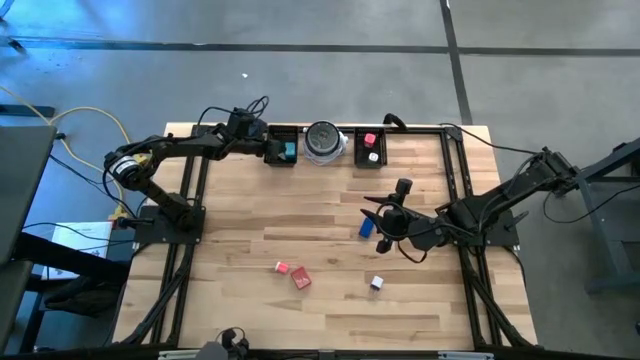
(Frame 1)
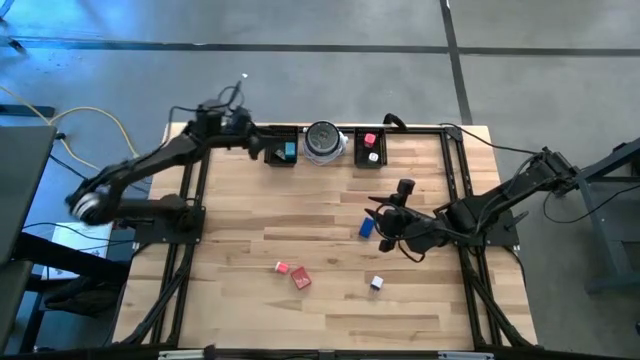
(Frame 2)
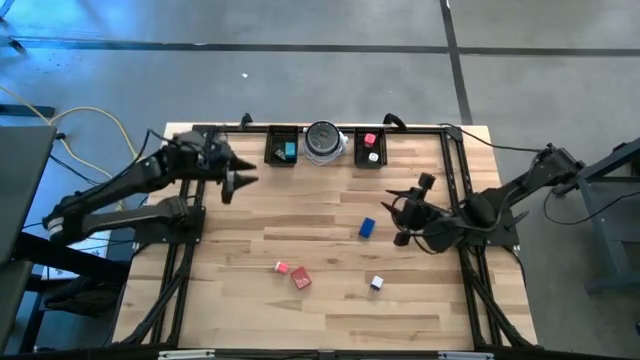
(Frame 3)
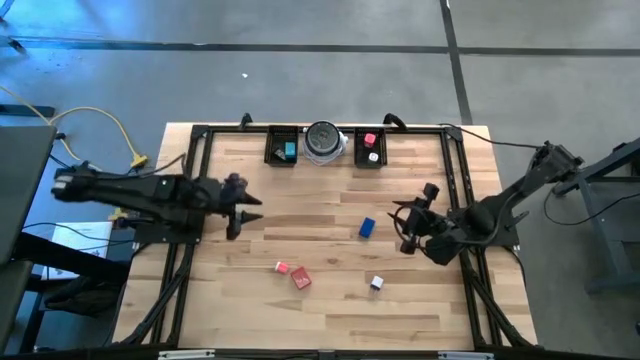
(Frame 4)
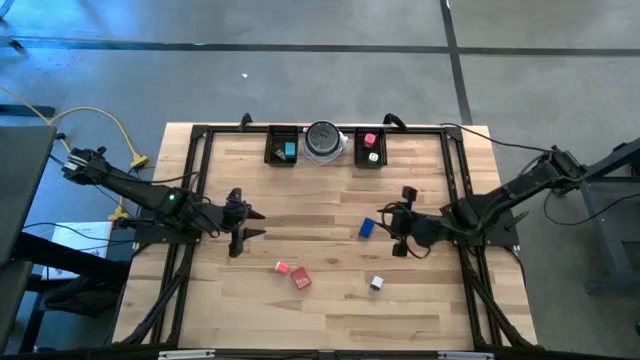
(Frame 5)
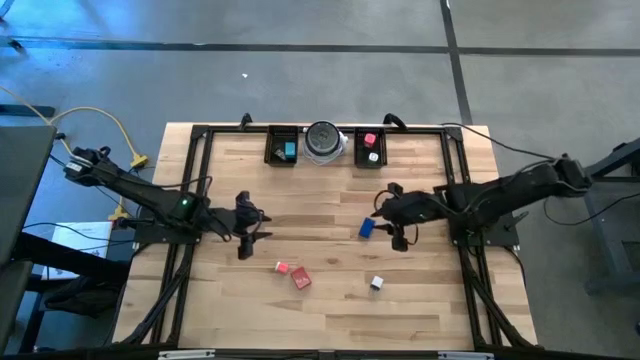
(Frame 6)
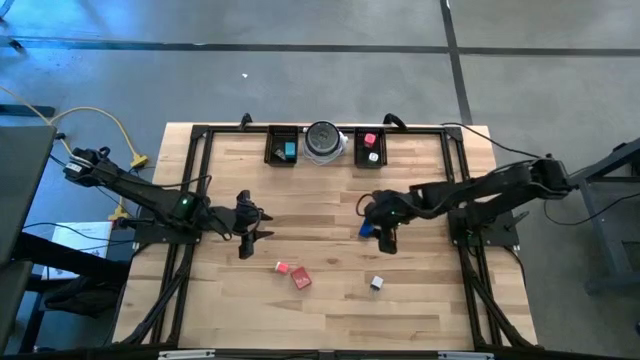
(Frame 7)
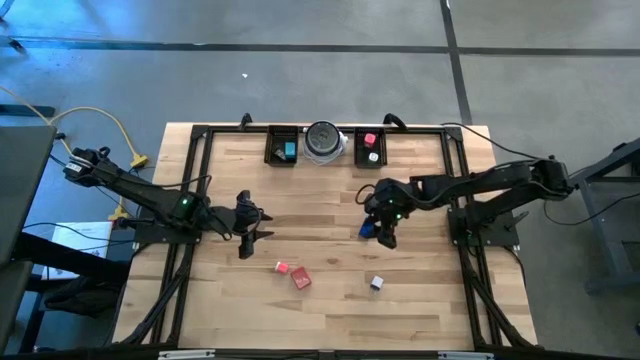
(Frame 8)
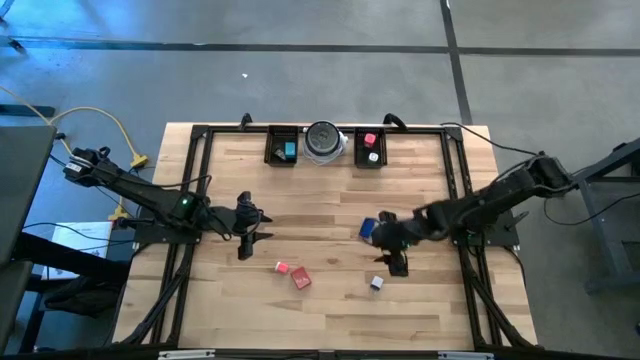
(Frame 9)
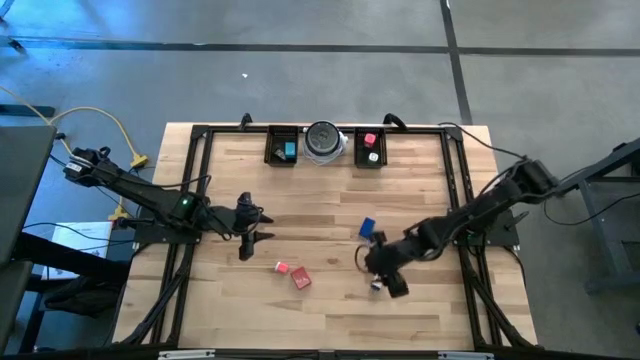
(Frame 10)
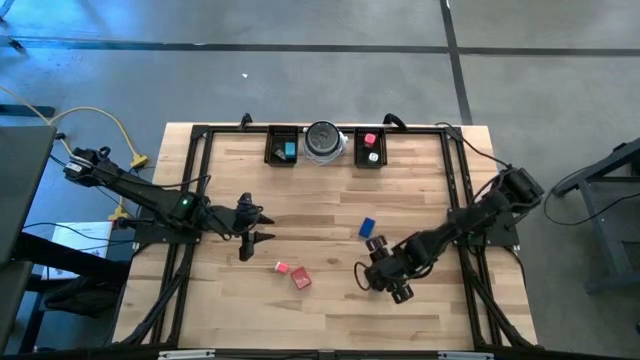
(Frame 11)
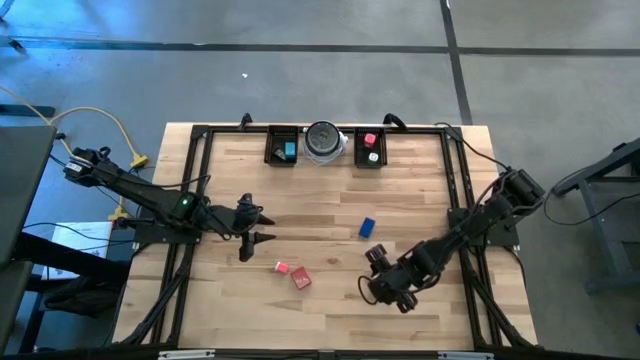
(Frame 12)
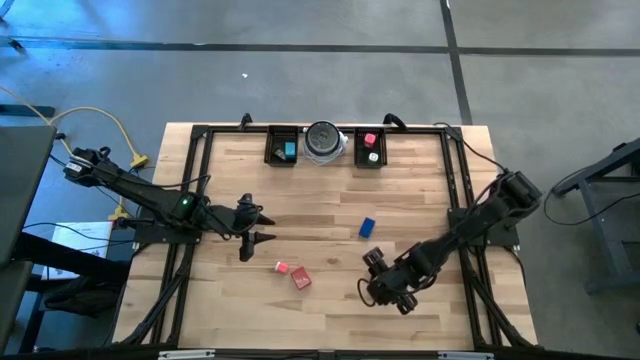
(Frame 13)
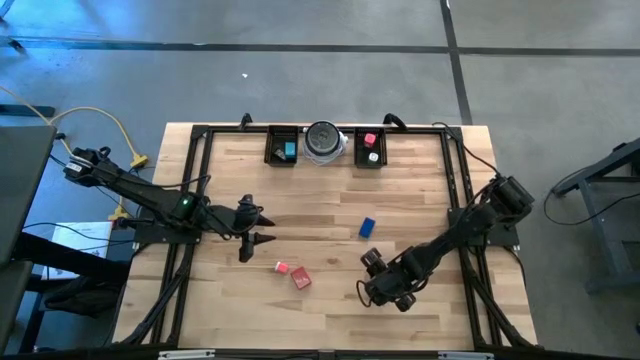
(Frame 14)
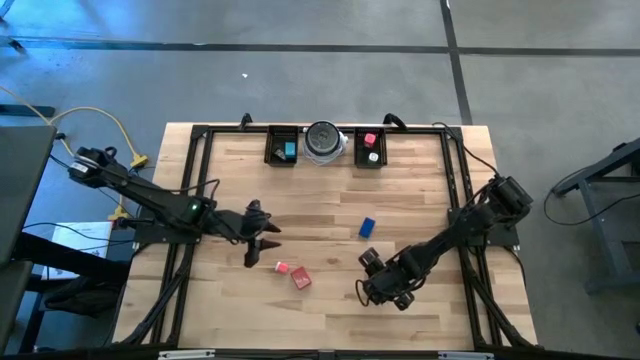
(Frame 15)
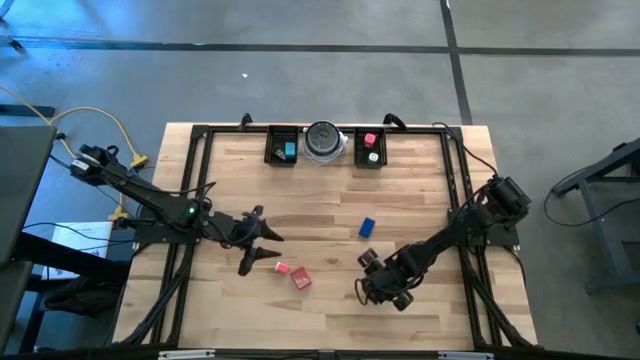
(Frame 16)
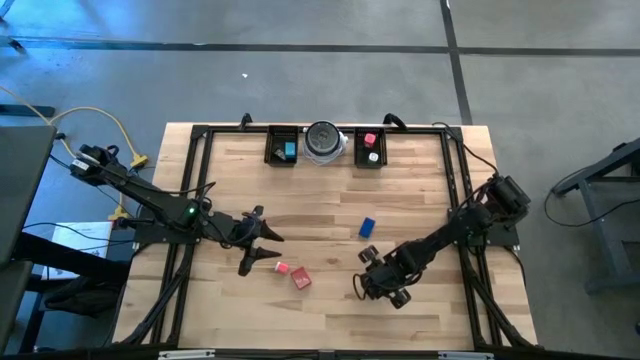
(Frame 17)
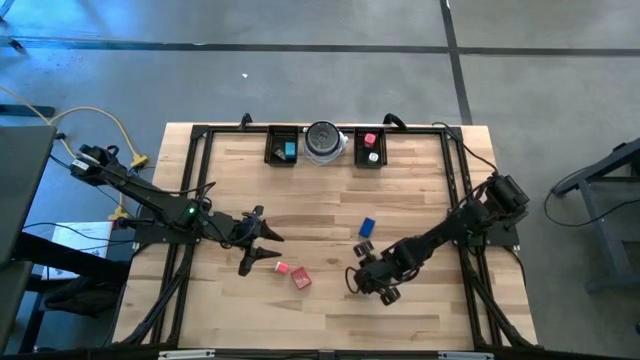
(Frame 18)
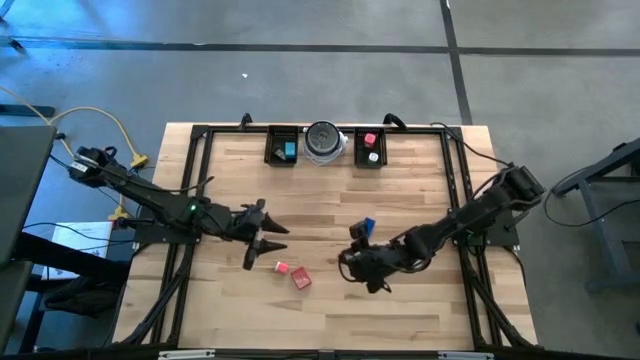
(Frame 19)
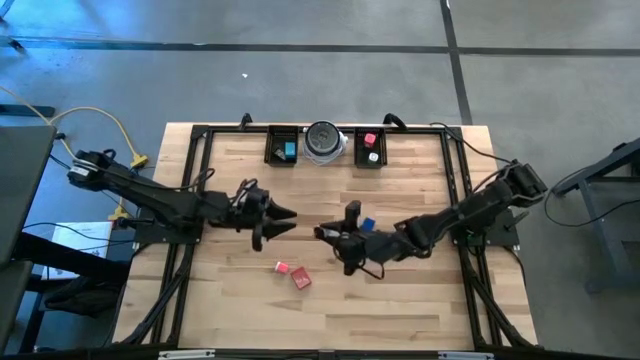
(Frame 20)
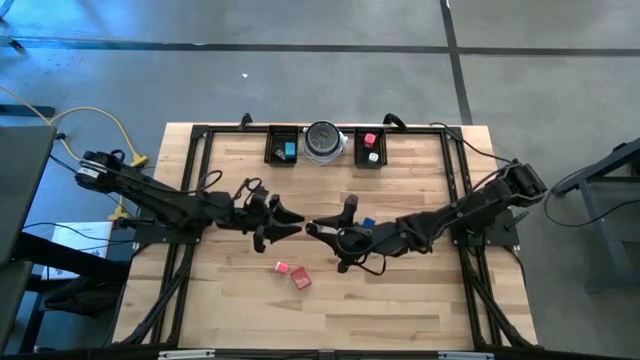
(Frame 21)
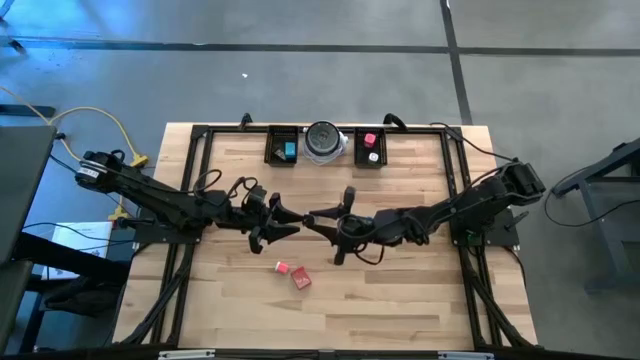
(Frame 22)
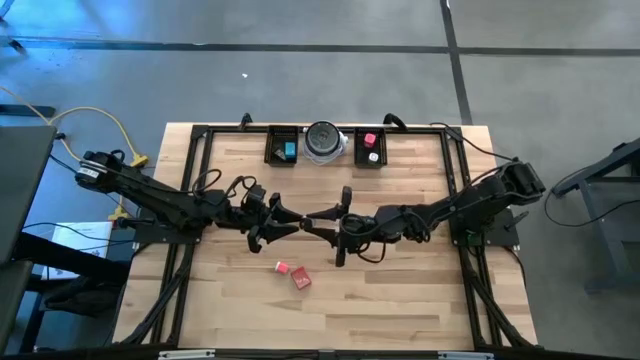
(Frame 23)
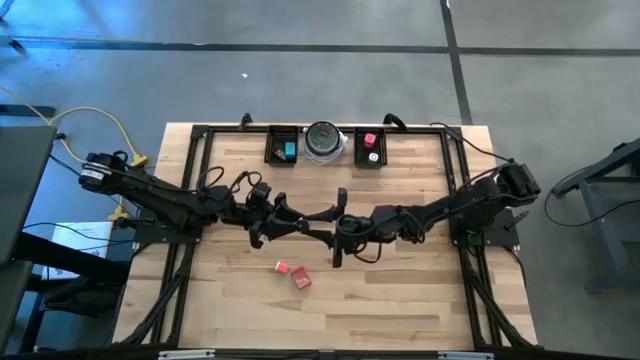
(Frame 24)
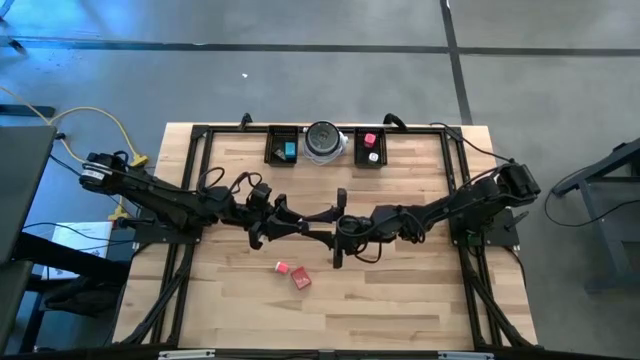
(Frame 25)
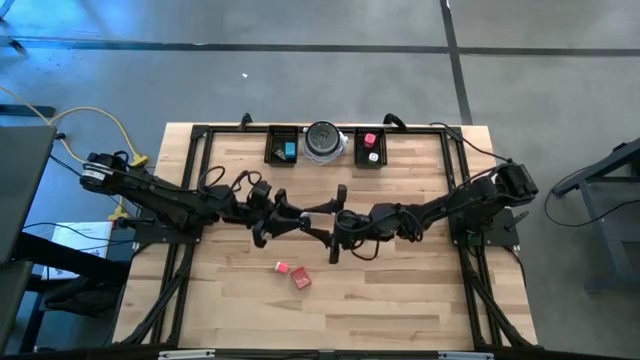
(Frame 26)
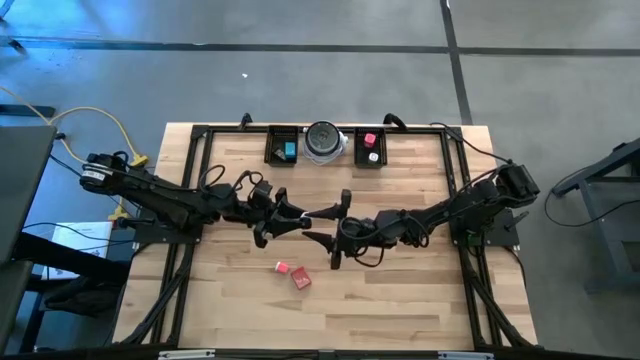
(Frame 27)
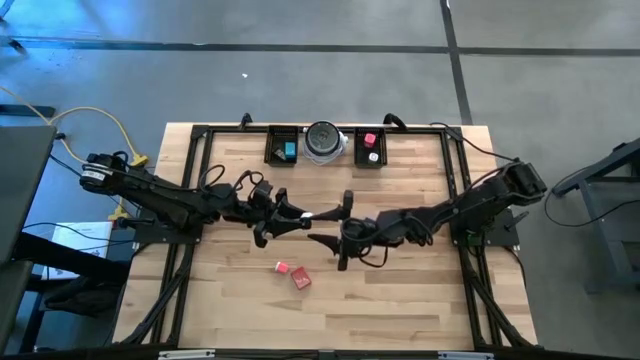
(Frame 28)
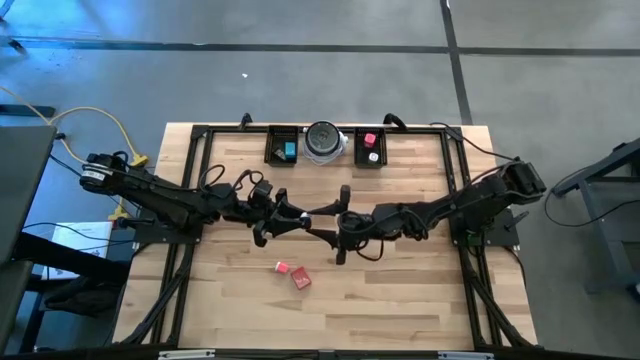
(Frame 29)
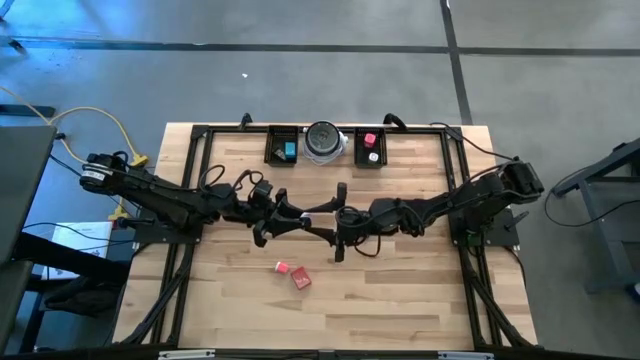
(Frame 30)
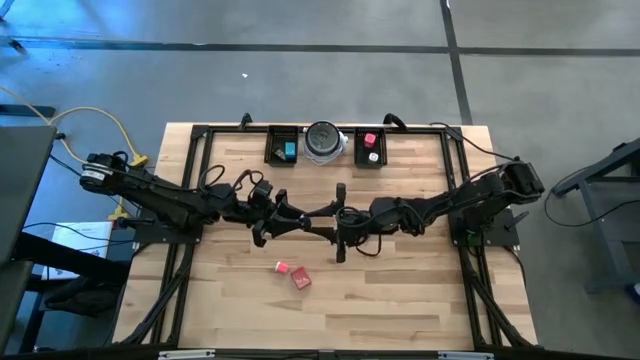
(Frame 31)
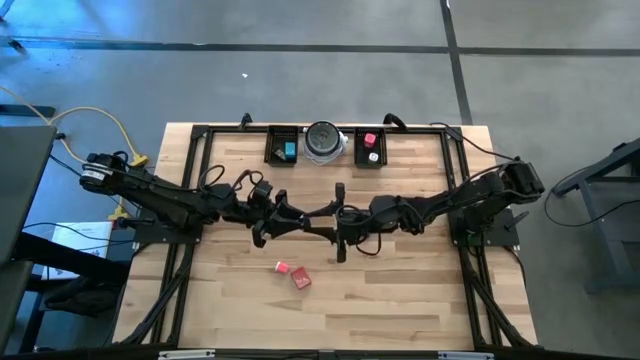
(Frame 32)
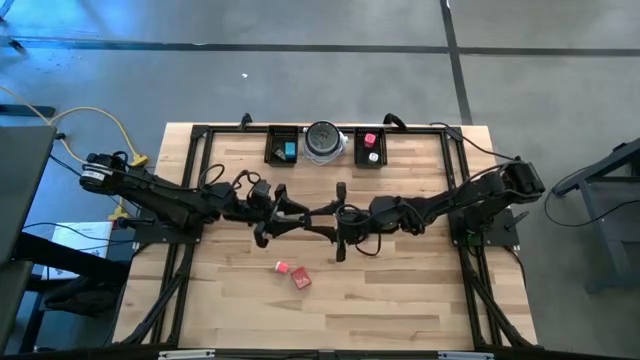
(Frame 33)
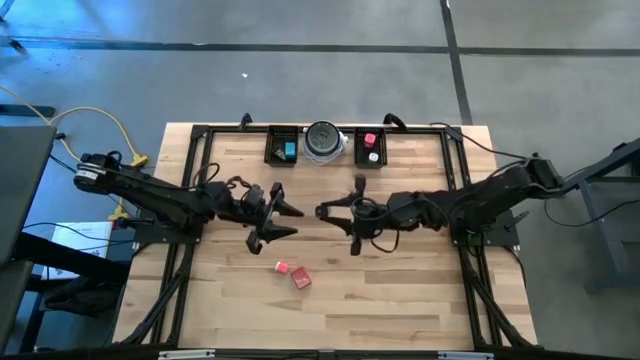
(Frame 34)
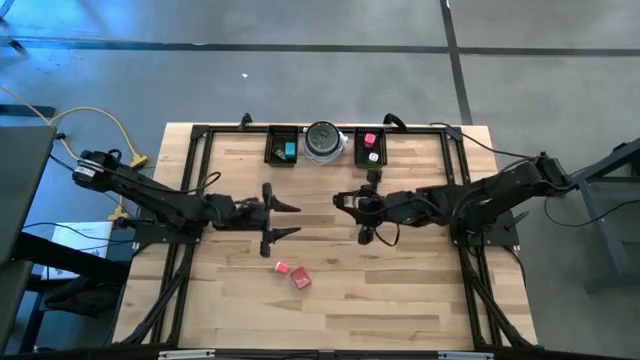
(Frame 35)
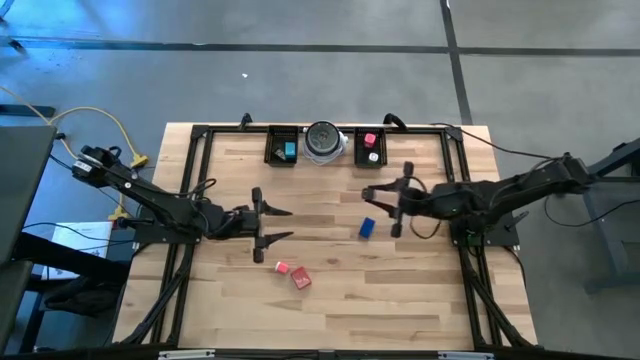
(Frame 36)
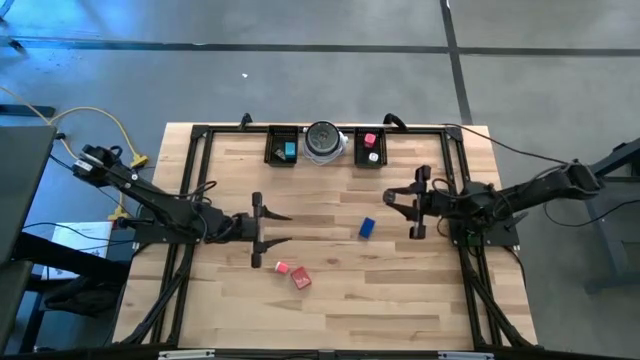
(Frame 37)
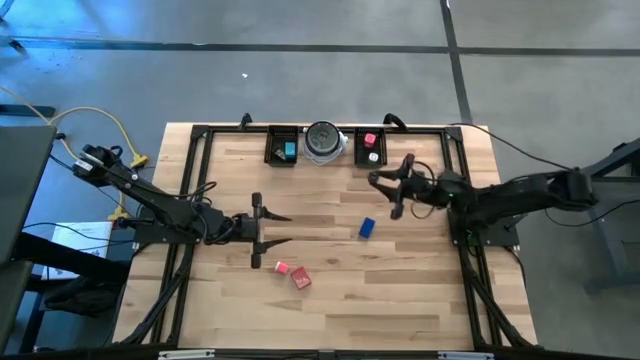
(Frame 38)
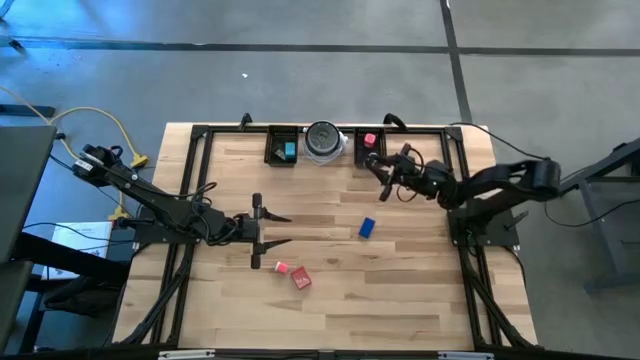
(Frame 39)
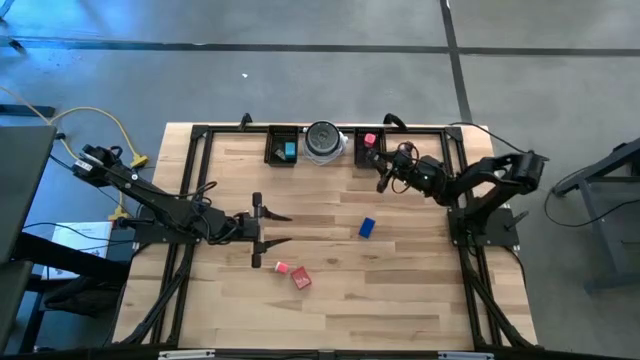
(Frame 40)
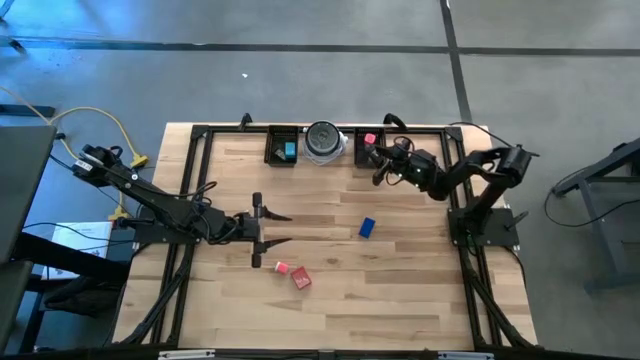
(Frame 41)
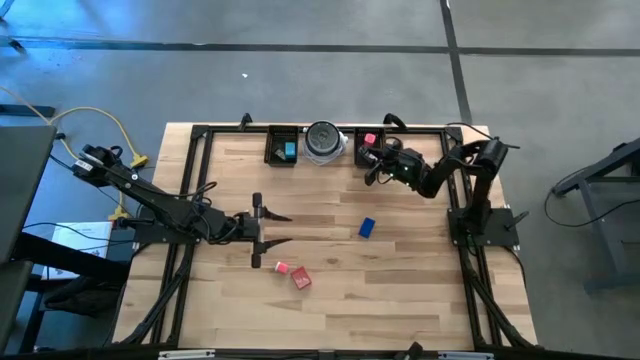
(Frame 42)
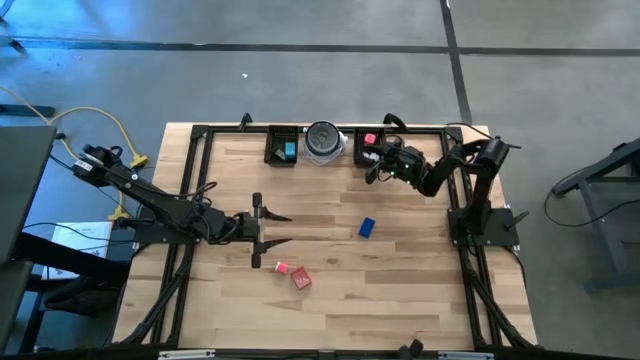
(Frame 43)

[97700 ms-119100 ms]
Task: Pick & Place Office items
Put the white charger adapter into the right black basket
